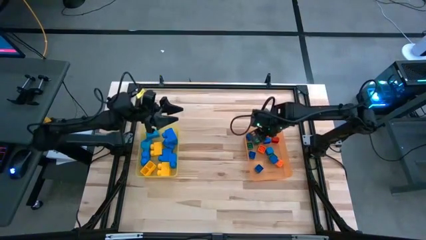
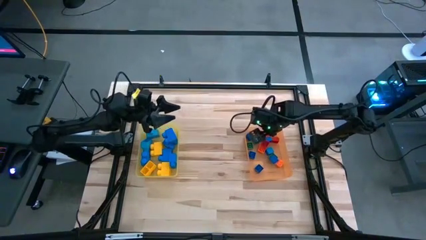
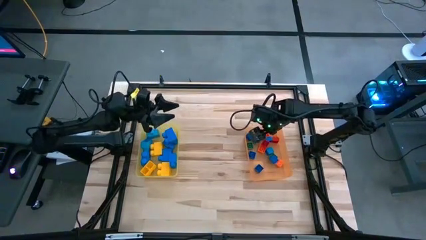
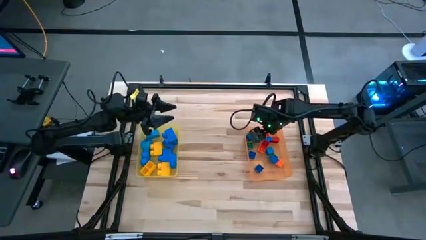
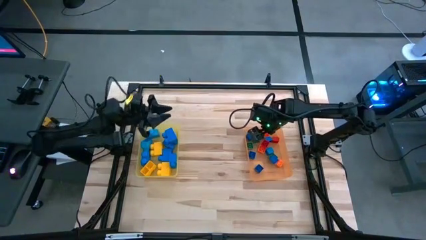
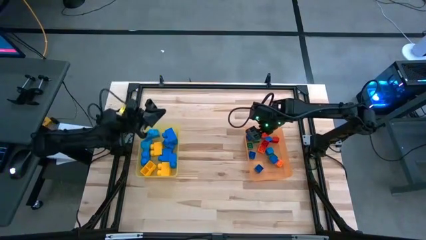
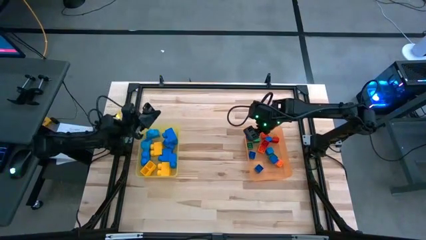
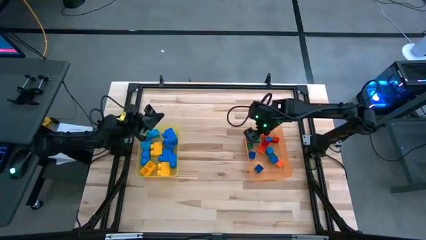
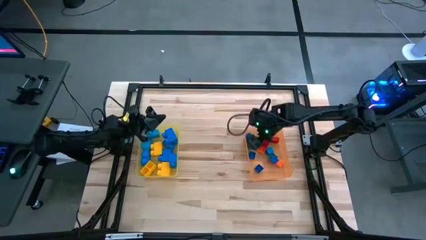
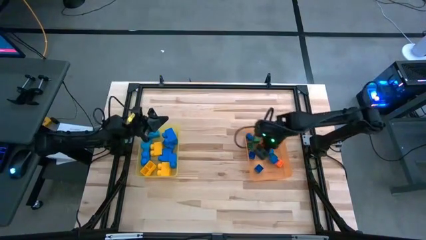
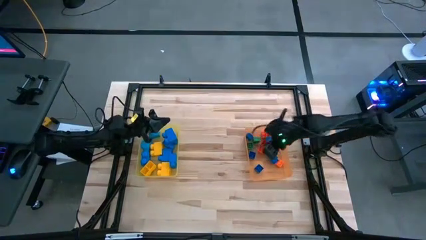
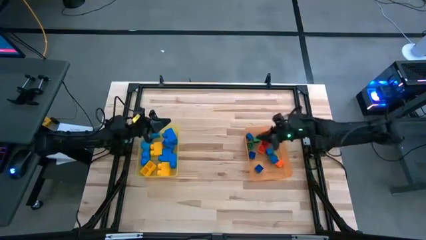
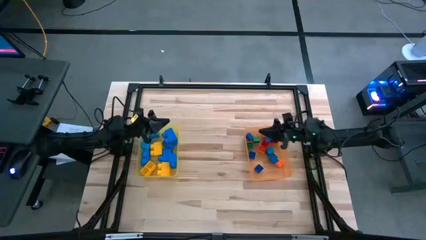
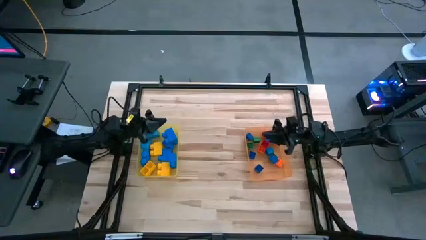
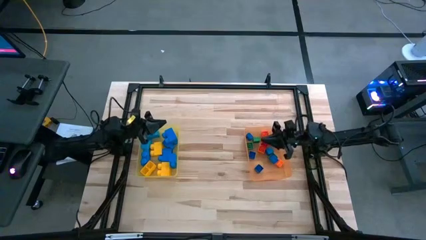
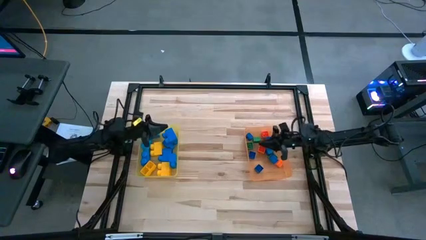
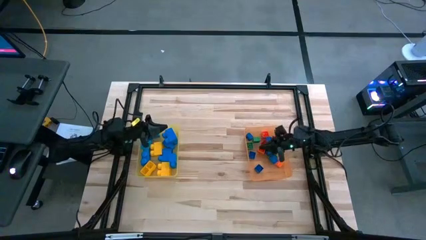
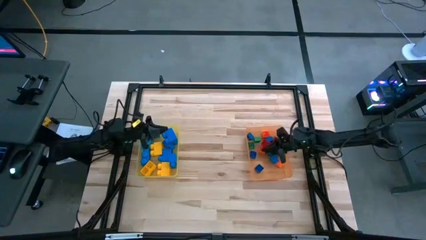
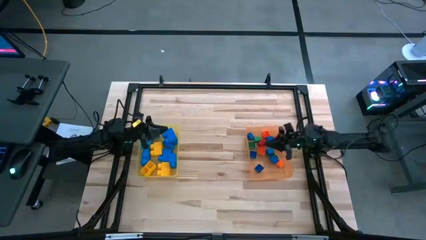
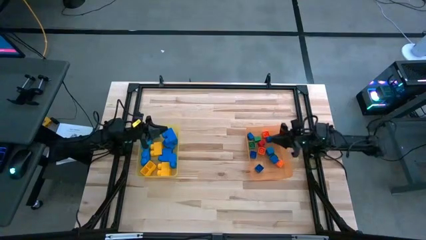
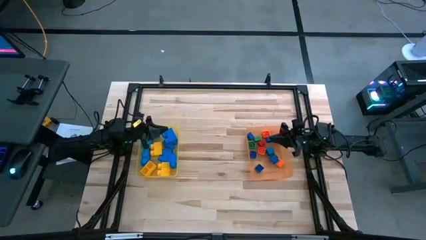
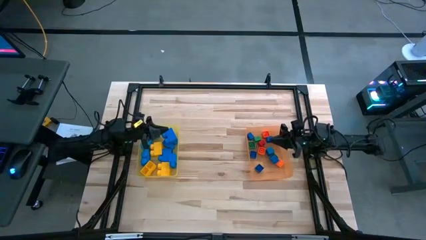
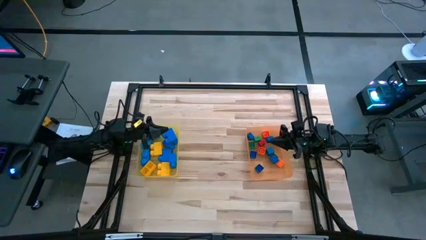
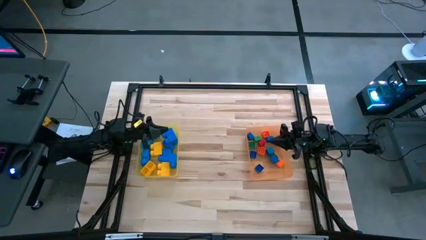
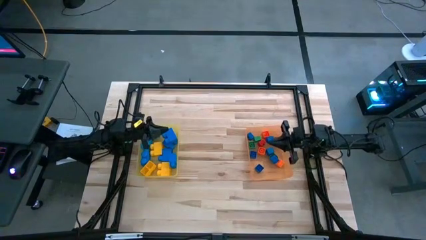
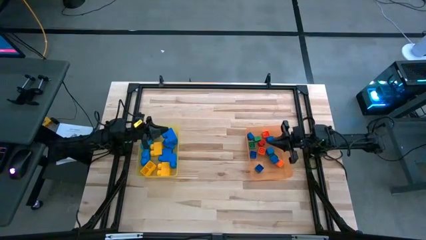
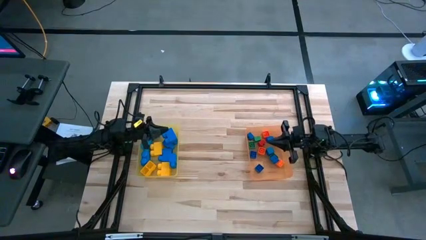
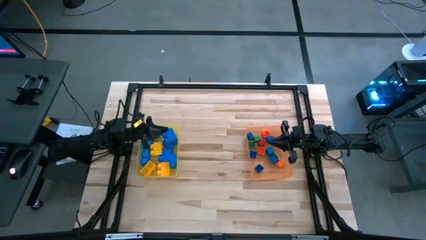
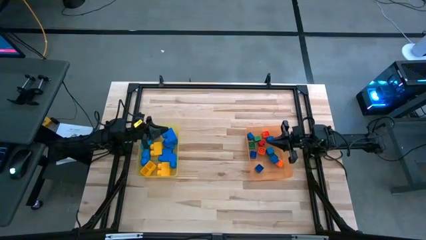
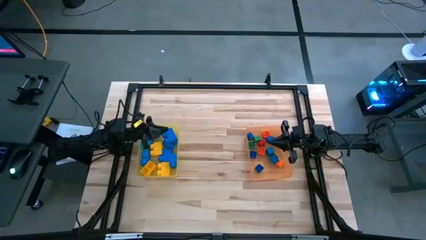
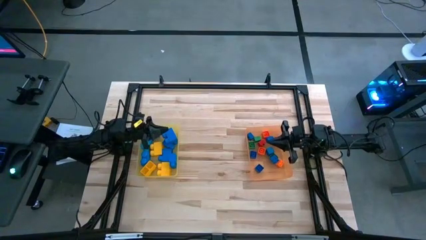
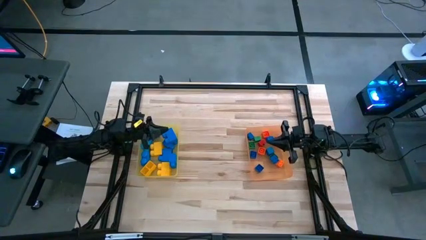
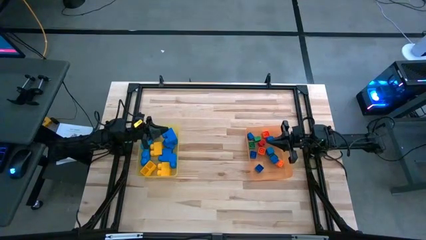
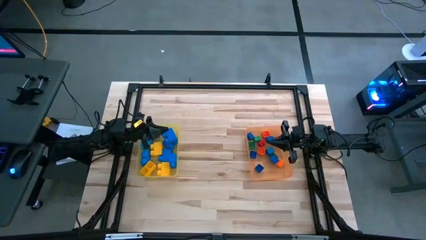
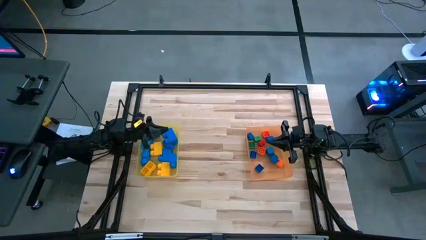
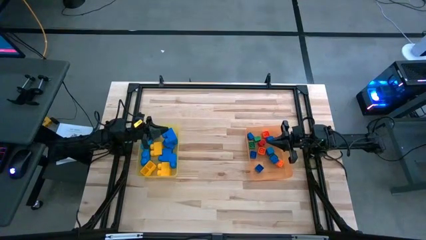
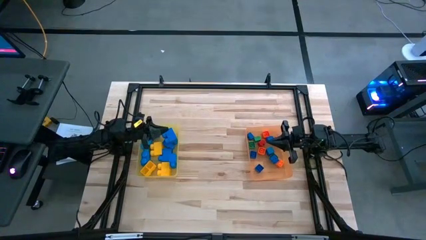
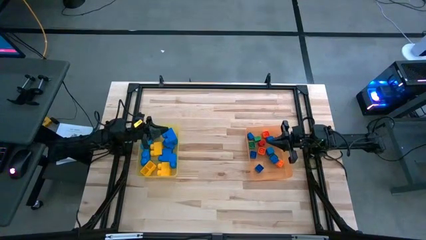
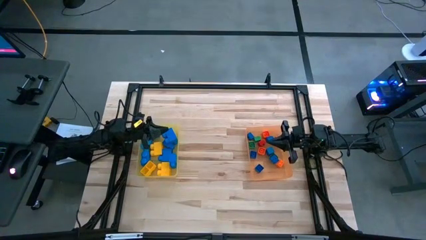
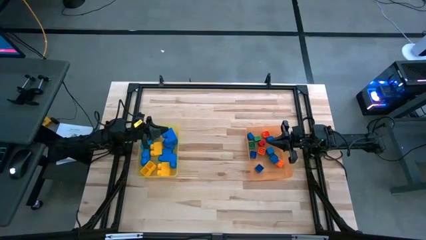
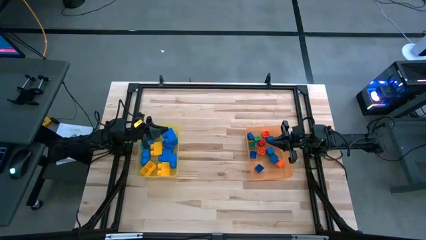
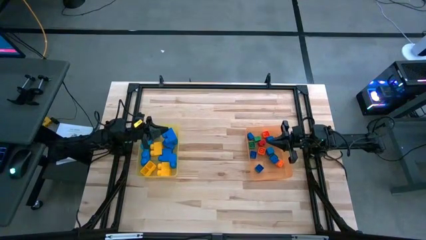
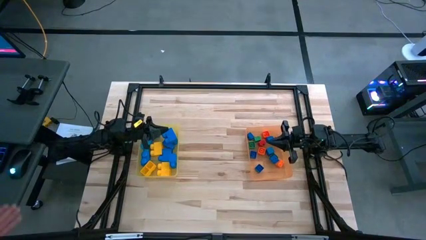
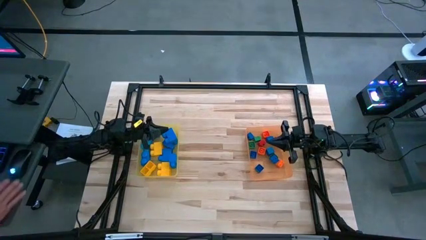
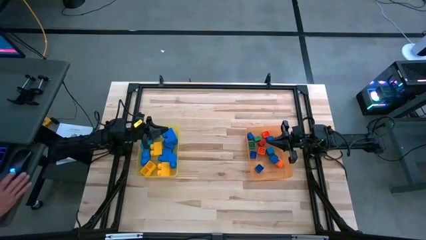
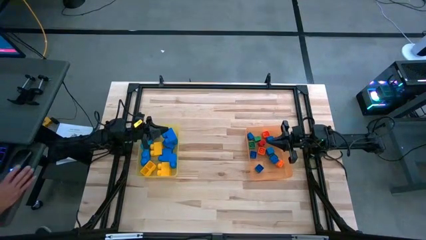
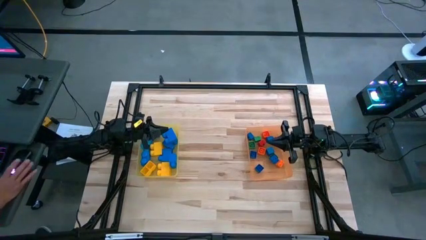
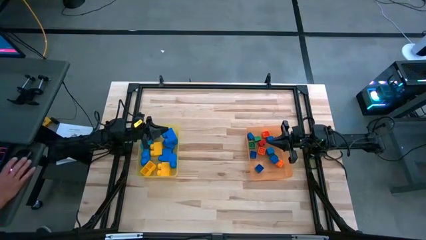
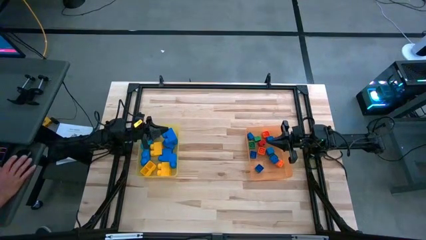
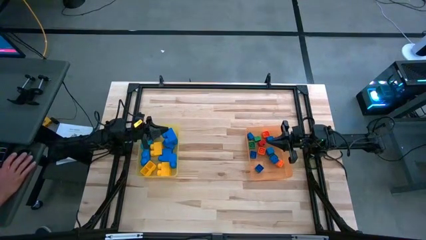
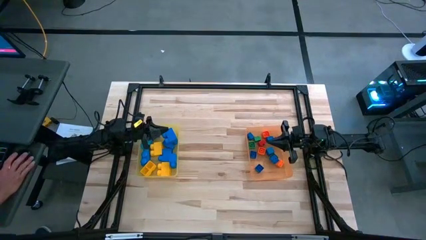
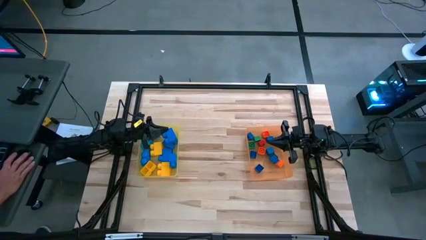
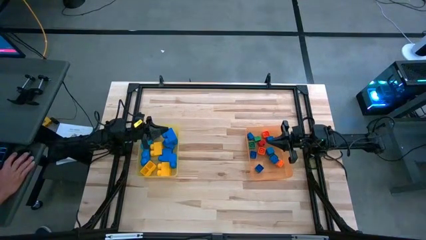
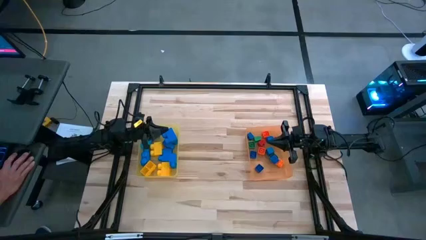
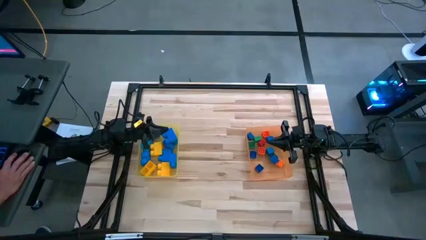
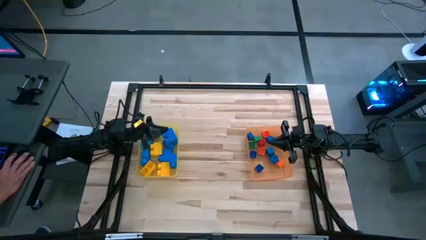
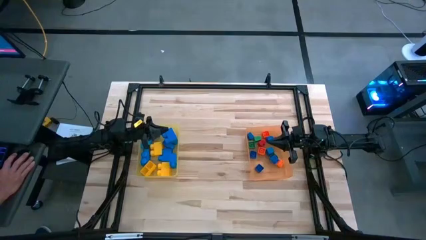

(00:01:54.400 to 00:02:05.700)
Task: Sort blocks by size
Return to Home Position

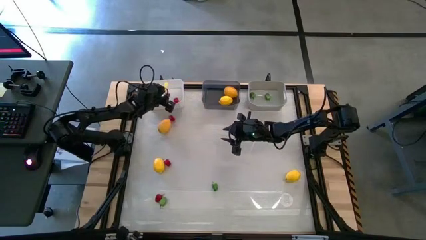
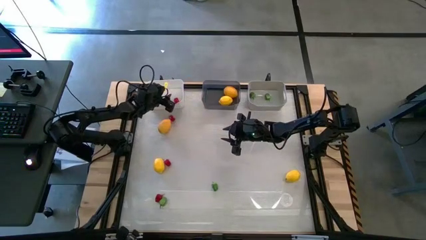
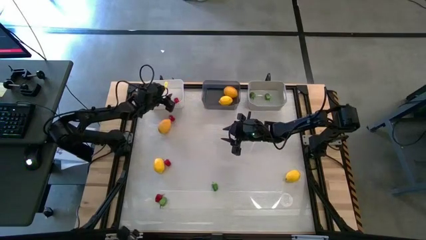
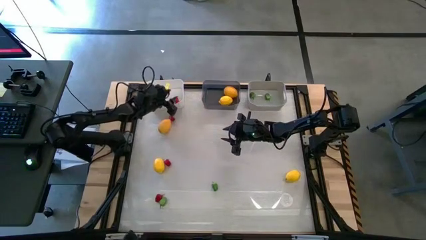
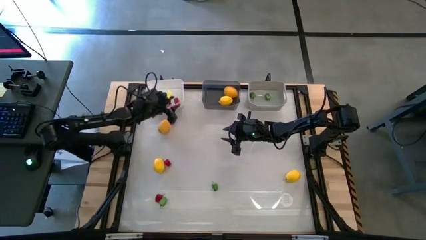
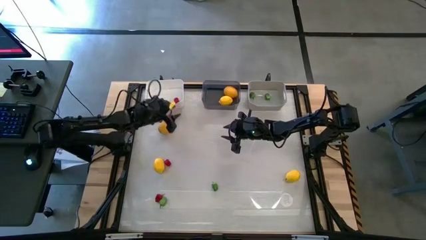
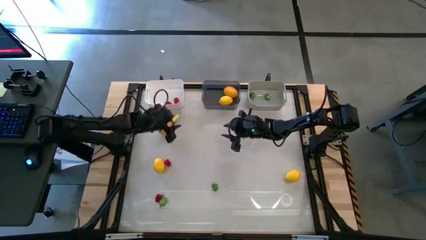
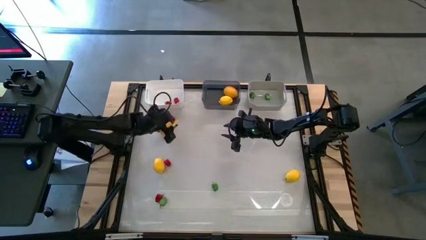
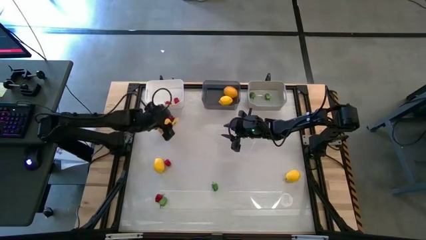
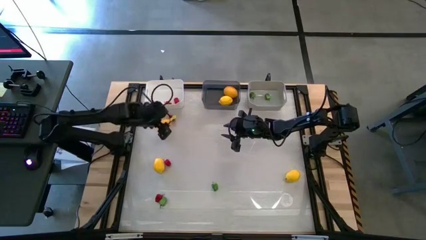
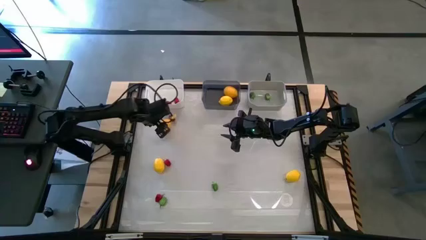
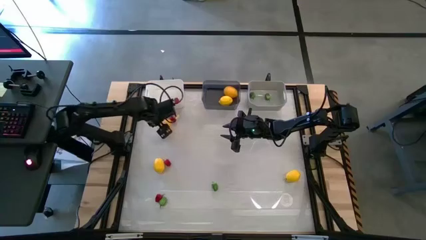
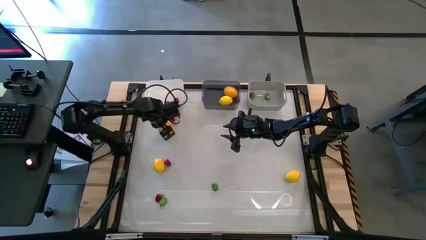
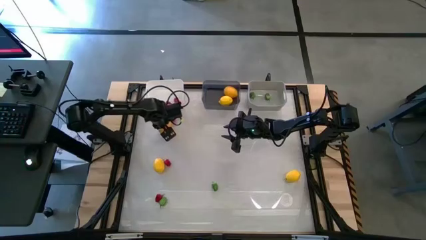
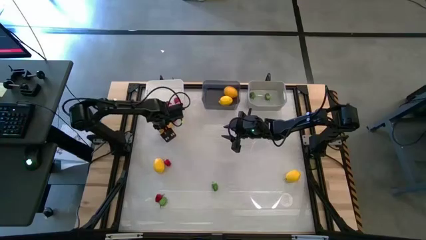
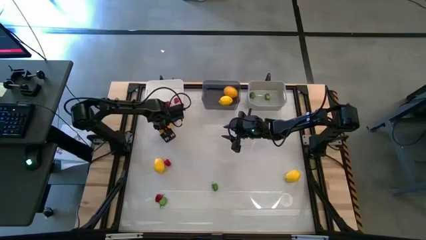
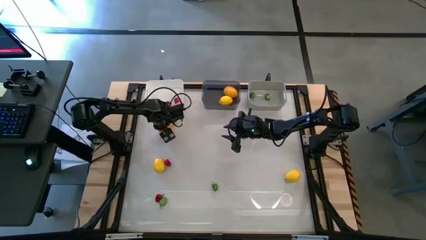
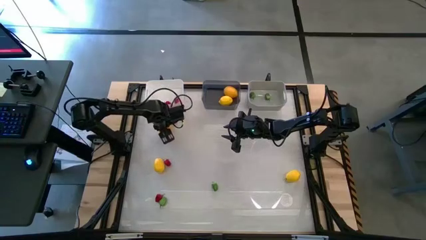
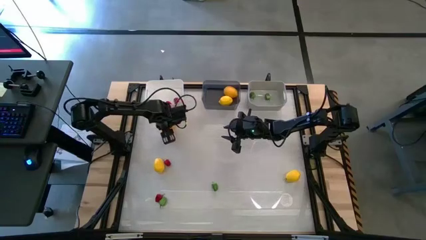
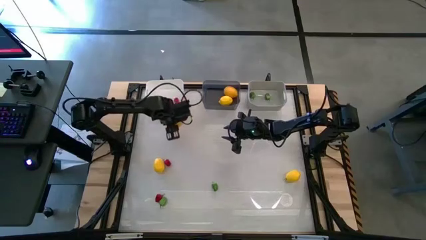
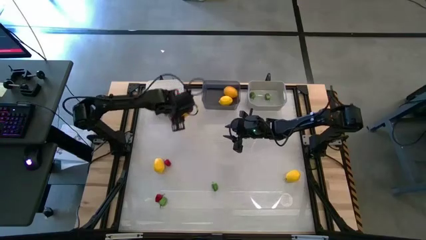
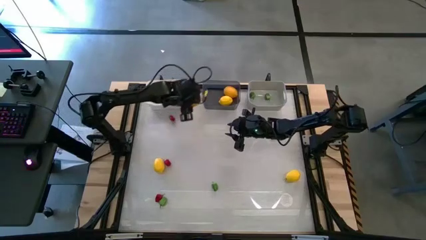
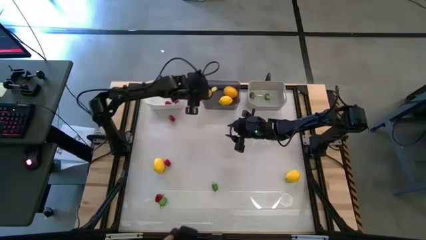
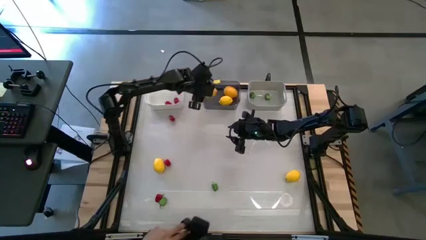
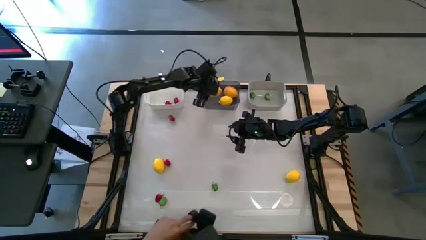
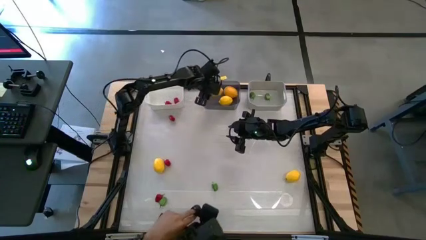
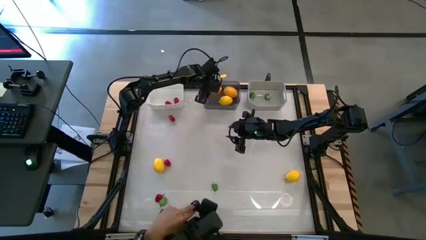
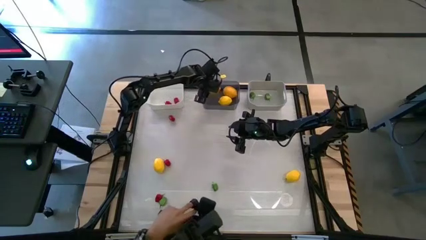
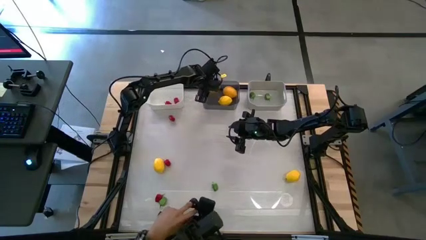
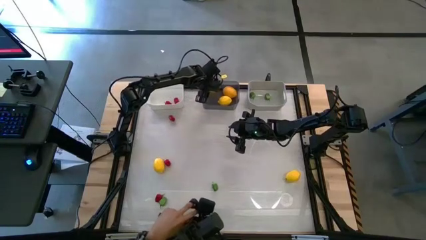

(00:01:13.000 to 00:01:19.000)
Task: Sort produce into baskets
Put the lemon into the black bin
